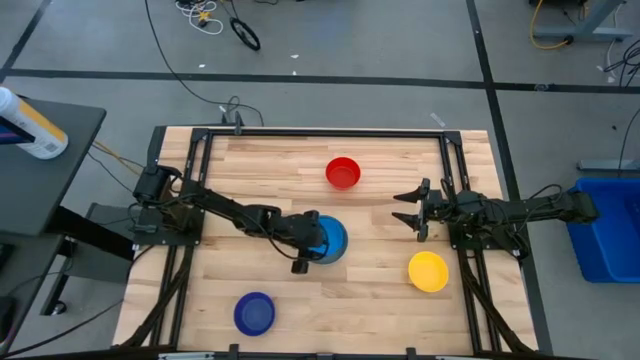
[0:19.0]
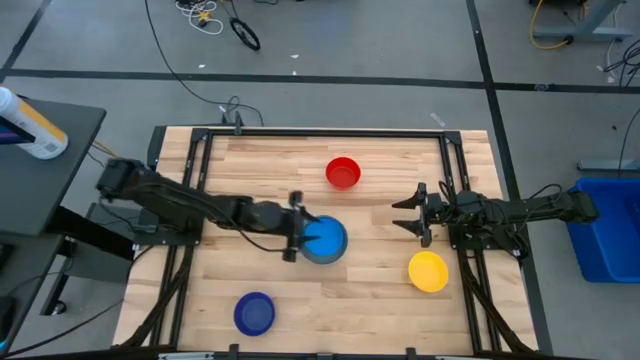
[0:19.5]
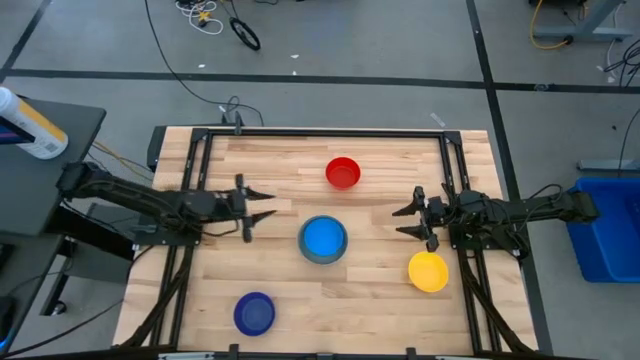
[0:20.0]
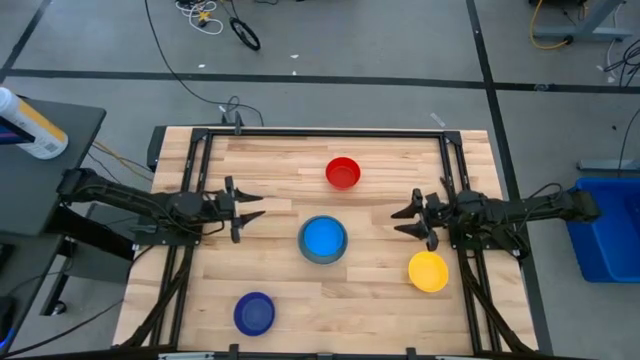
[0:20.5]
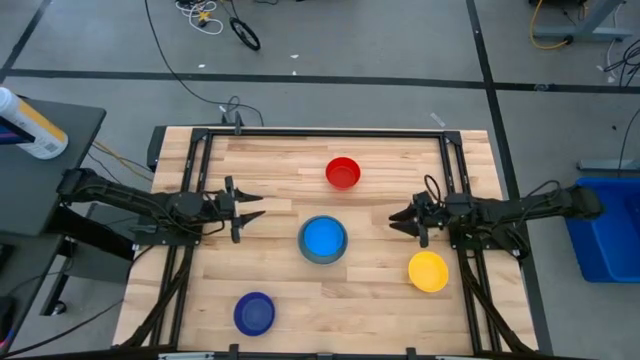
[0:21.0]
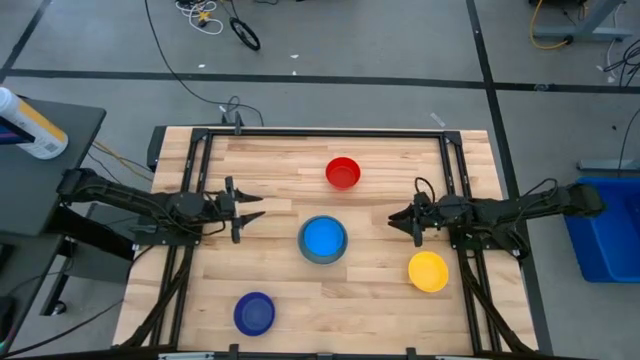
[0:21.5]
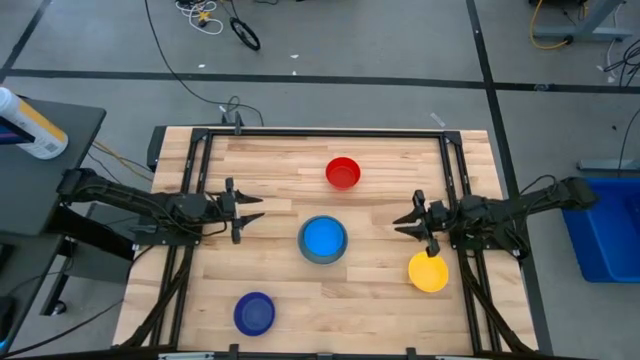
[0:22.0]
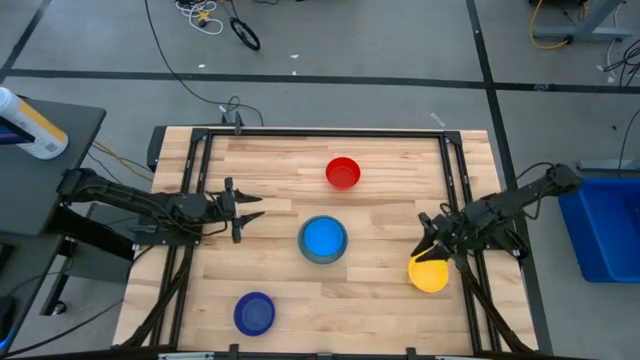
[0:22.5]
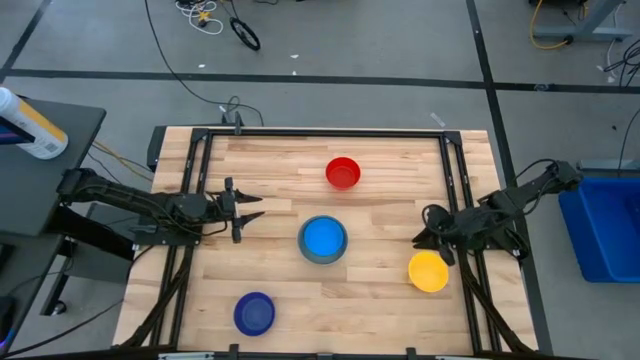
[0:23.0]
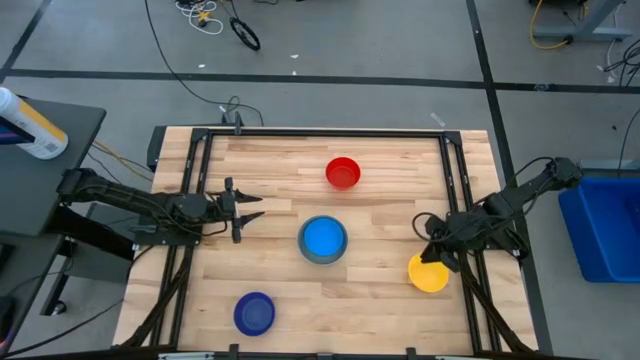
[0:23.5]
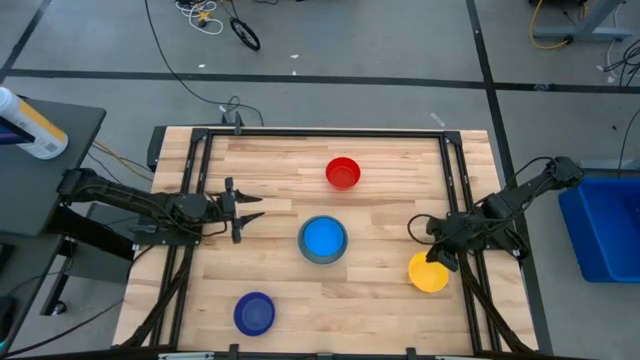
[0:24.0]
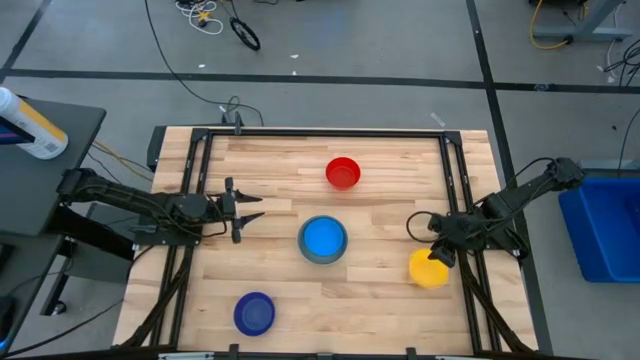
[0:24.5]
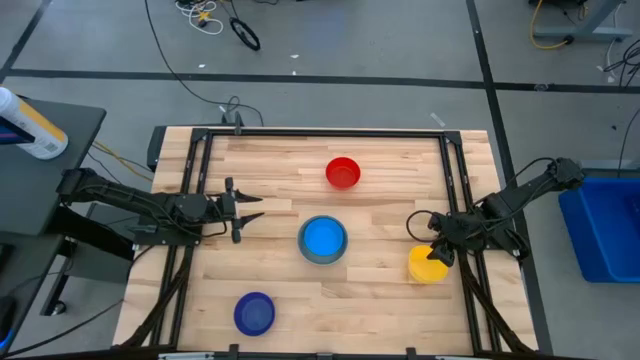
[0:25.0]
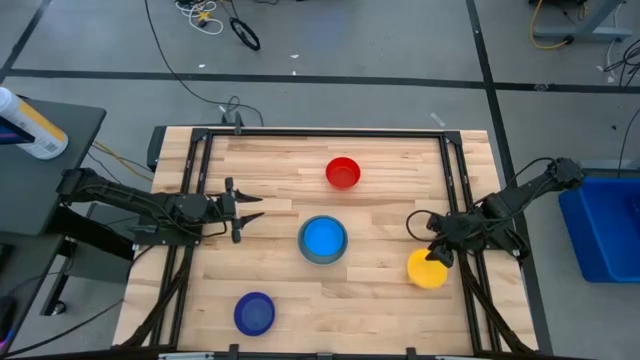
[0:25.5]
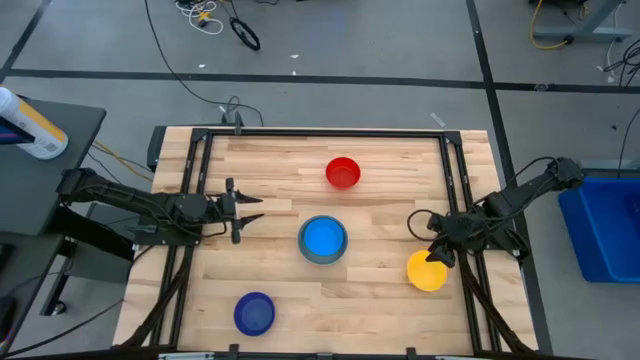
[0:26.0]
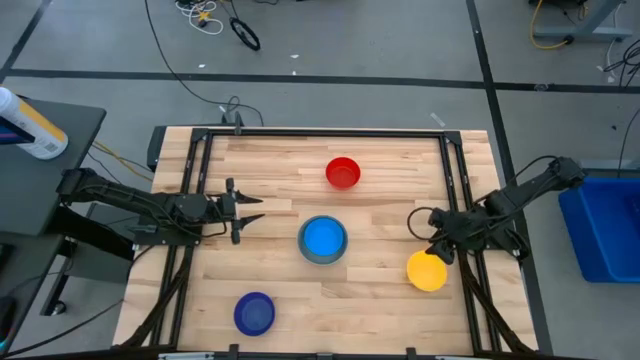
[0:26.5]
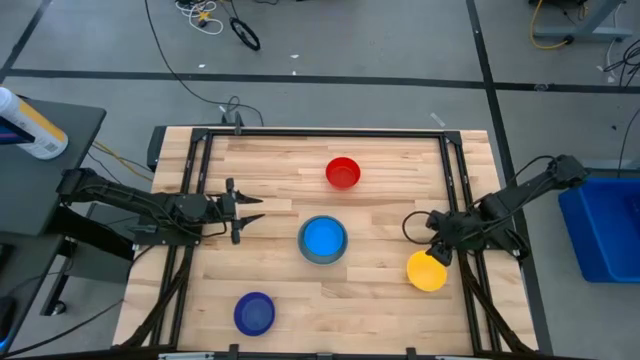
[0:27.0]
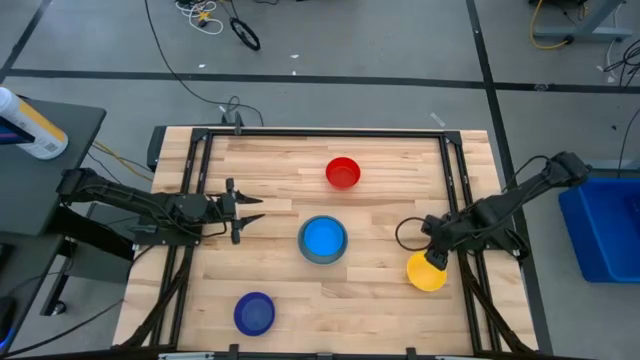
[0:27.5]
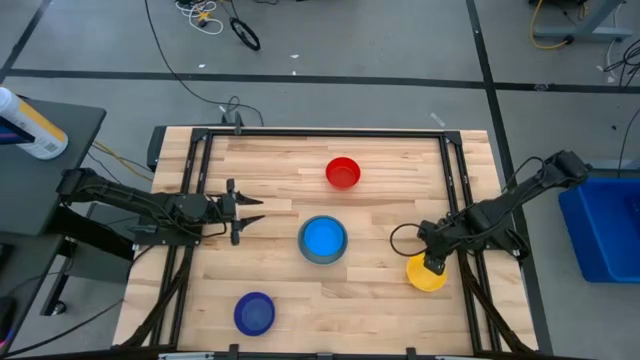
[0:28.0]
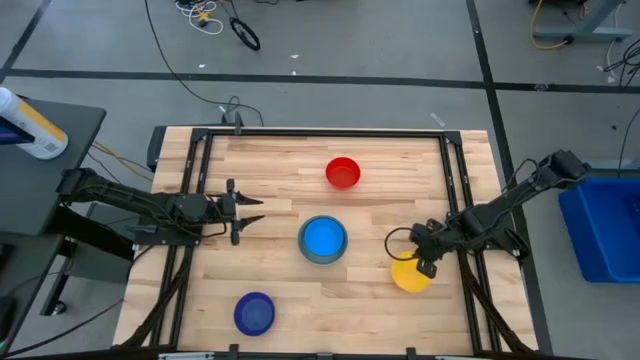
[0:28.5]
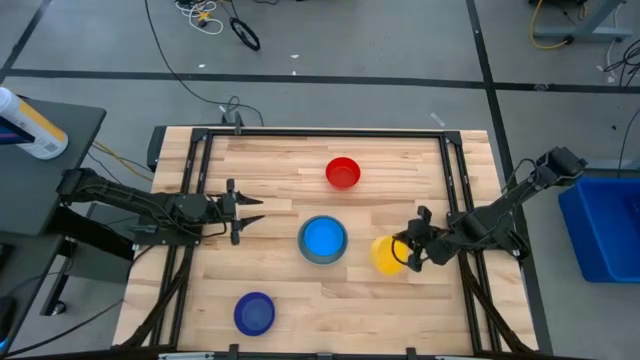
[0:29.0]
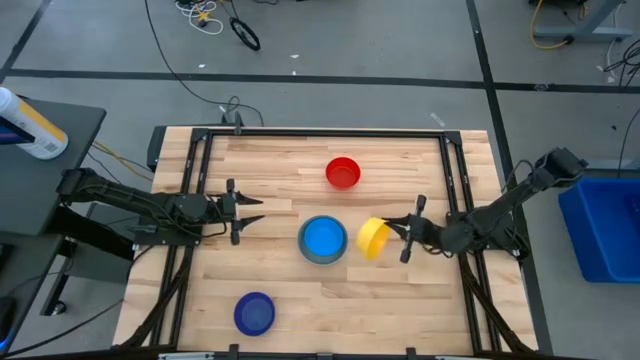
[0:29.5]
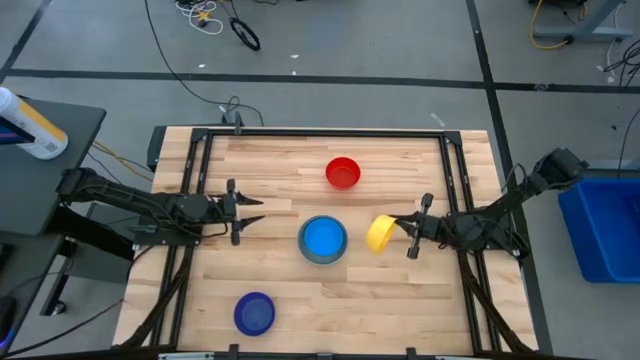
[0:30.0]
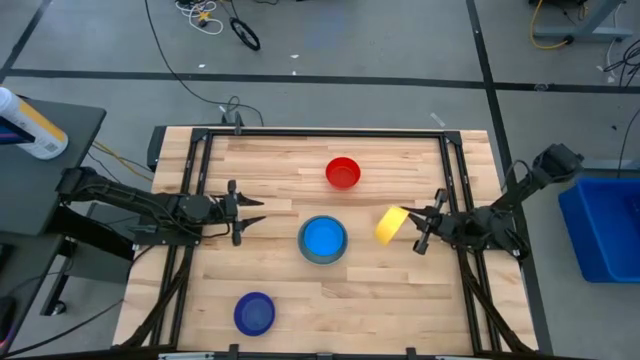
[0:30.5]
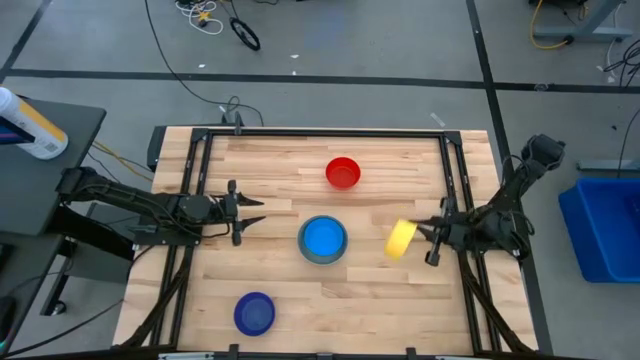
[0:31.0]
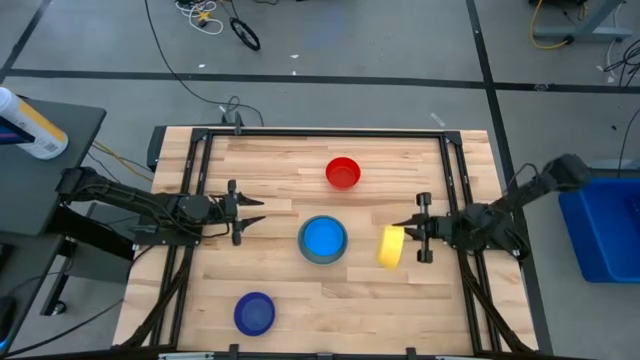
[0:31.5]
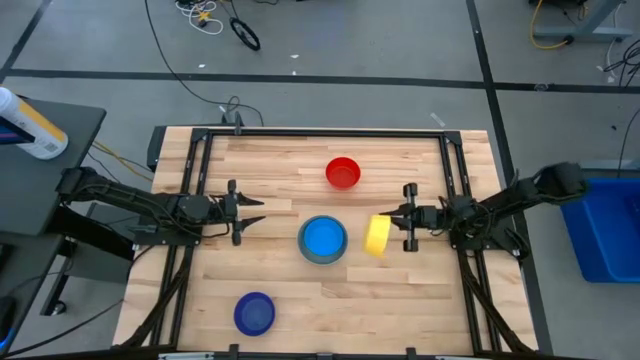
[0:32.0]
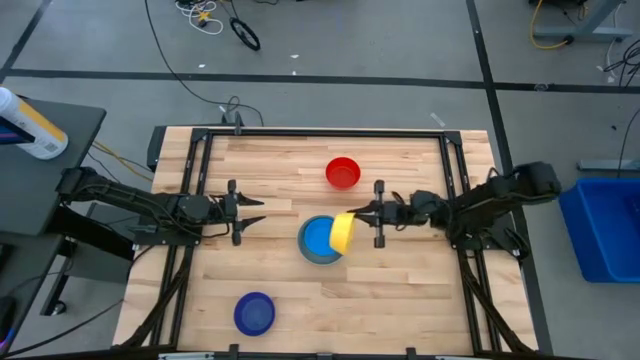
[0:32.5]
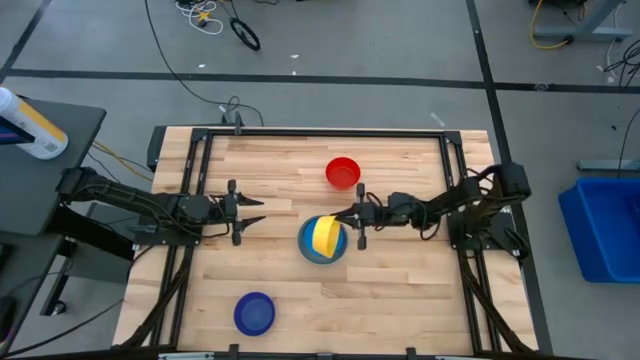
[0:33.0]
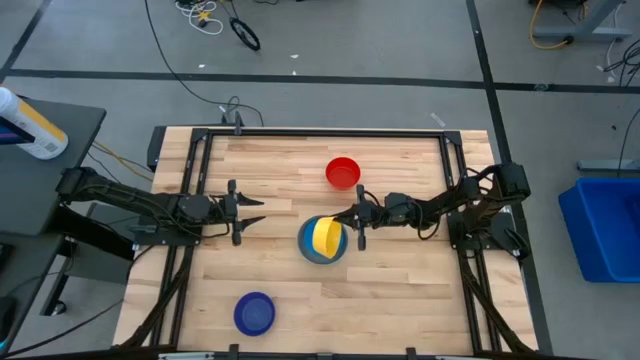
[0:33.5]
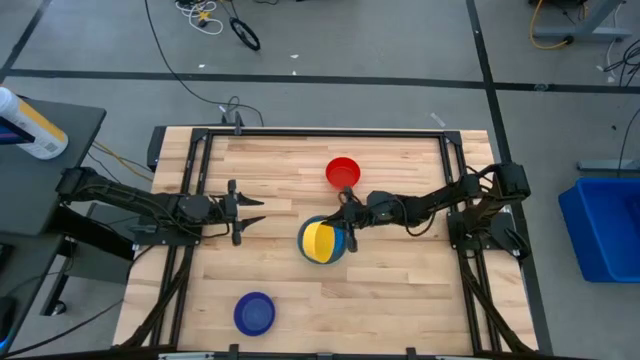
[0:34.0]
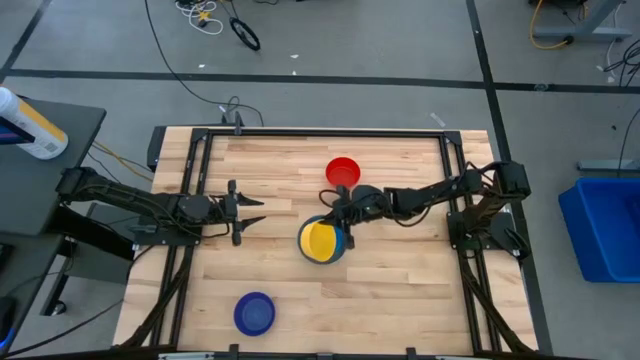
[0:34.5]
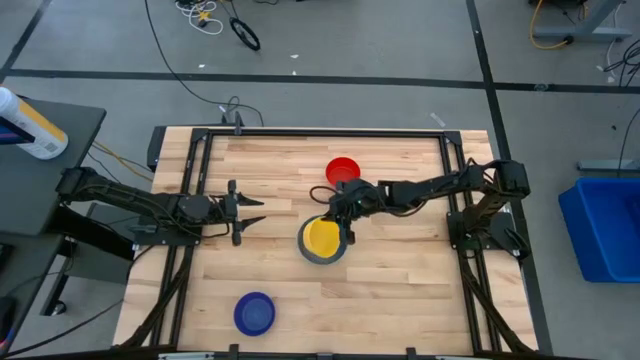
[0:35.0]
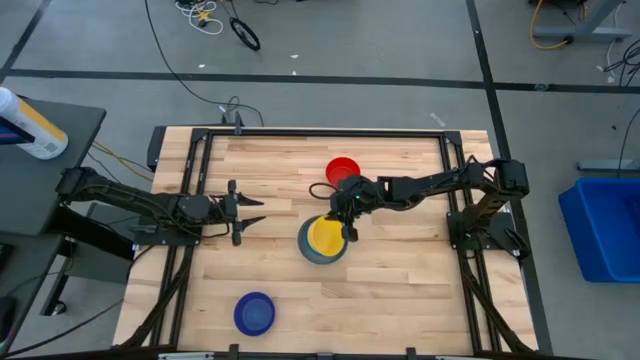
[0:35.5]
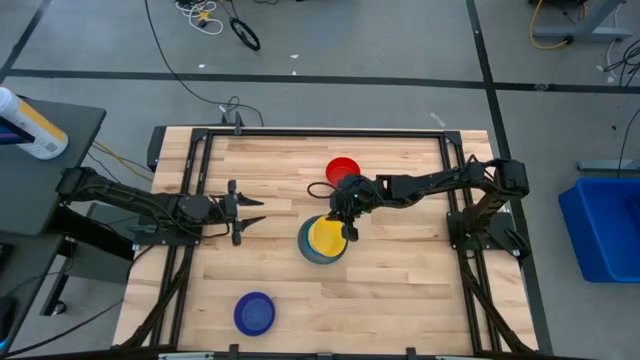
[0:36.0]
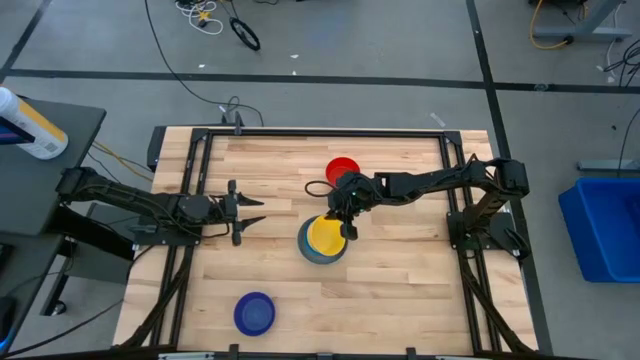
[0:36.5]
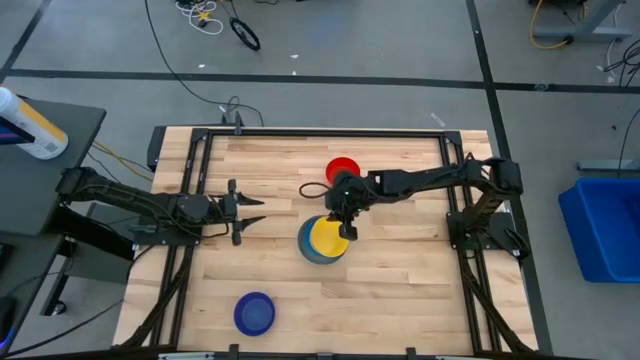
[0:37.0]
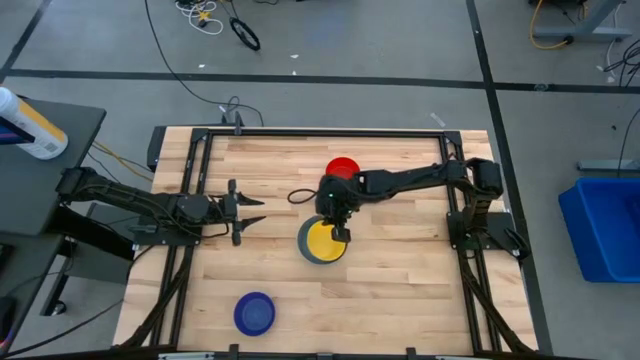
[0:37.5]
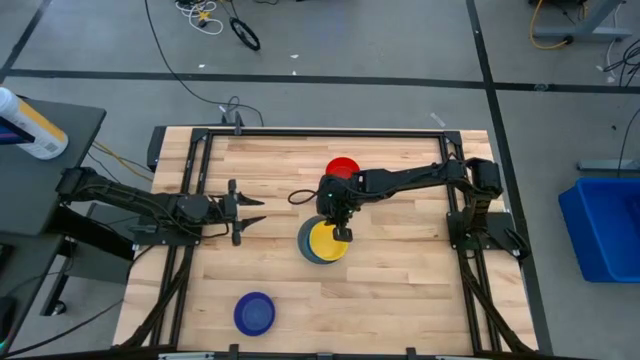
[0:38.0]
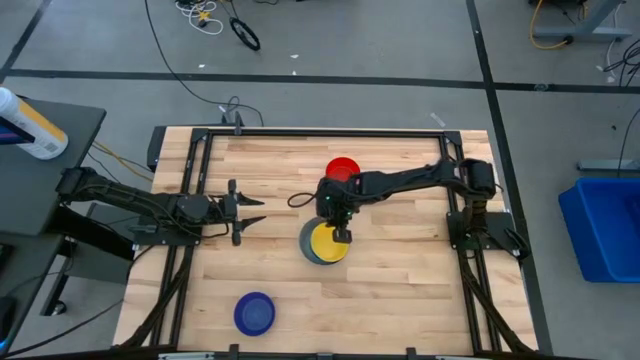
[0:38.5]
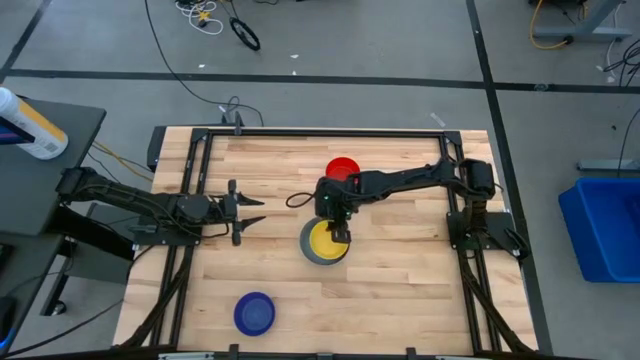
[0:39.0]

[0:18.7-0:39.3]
Stack the yellow bowl on the light blue bowl
